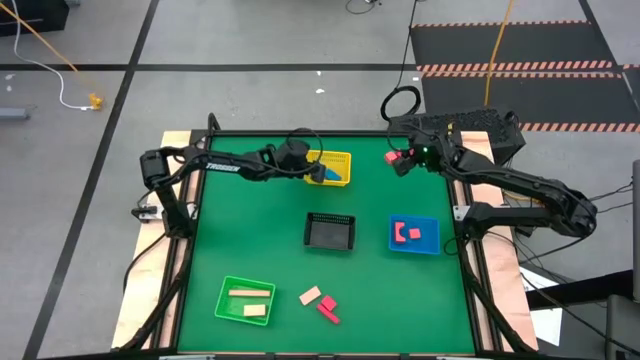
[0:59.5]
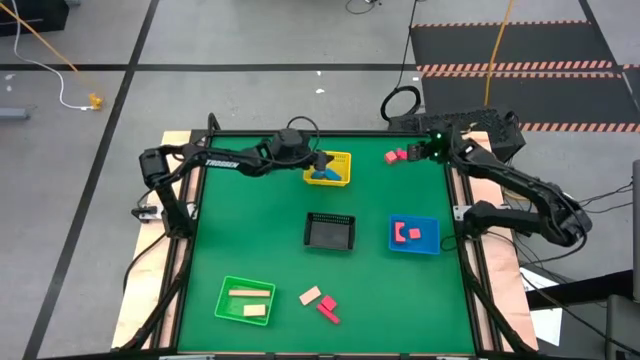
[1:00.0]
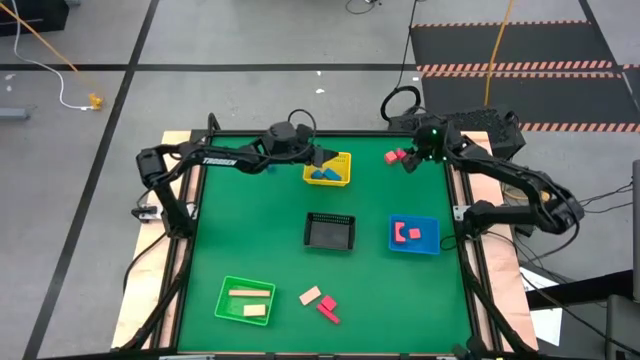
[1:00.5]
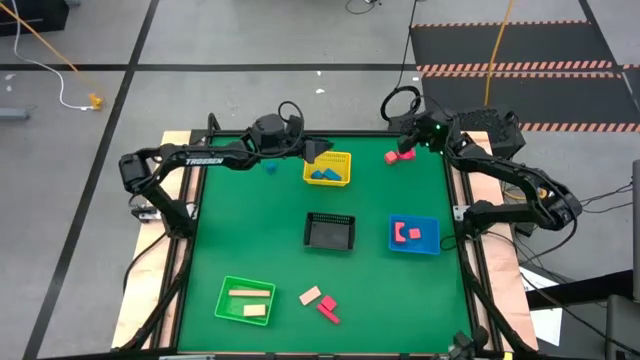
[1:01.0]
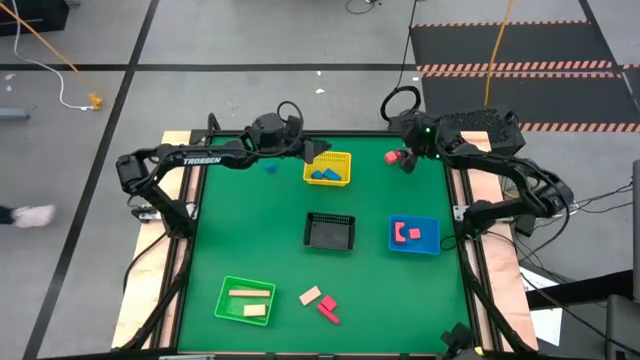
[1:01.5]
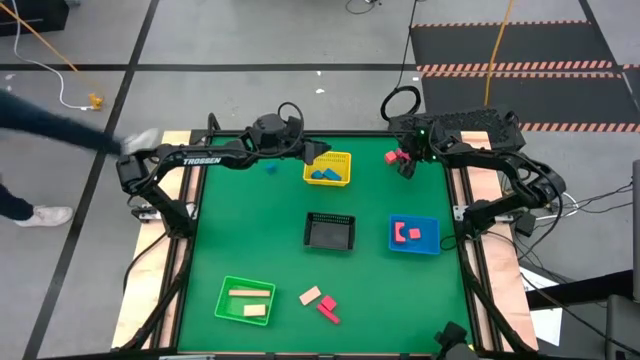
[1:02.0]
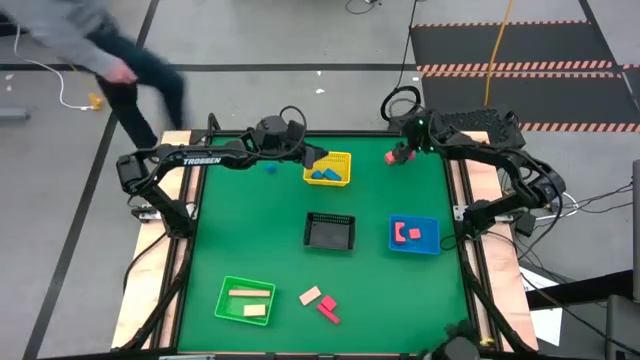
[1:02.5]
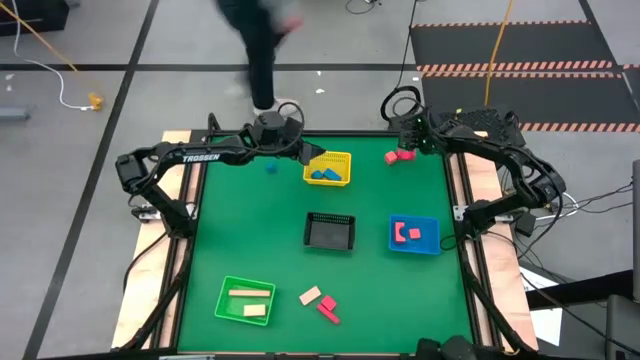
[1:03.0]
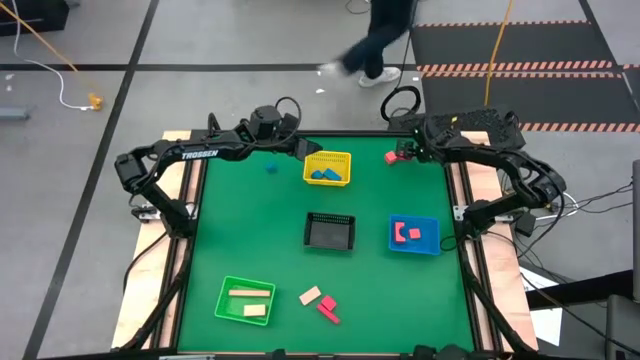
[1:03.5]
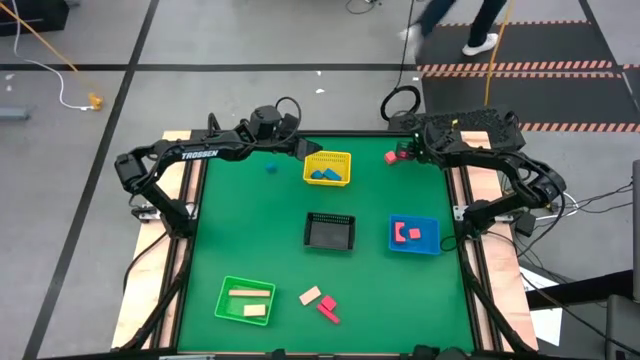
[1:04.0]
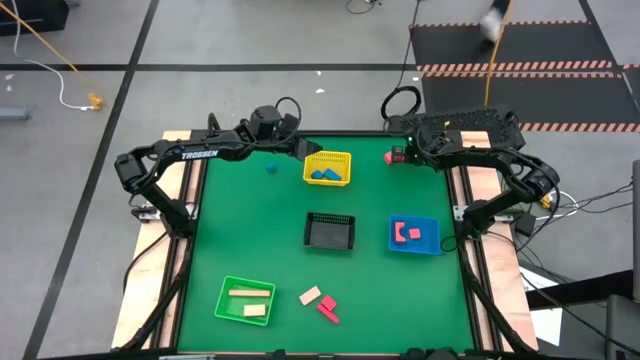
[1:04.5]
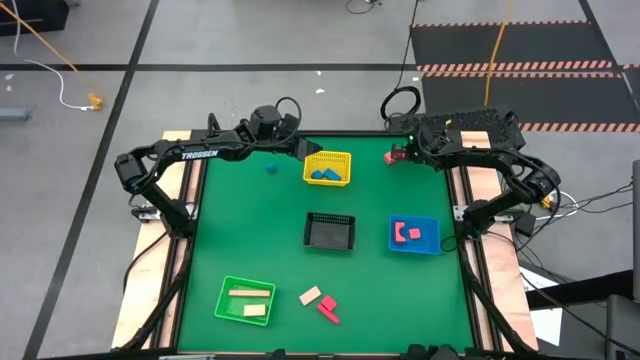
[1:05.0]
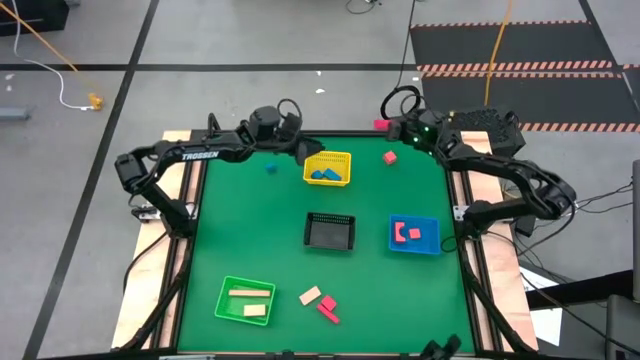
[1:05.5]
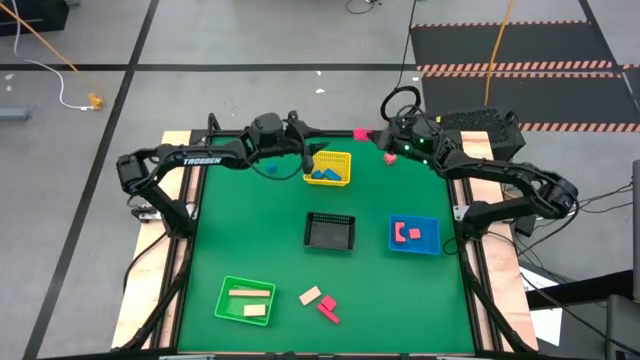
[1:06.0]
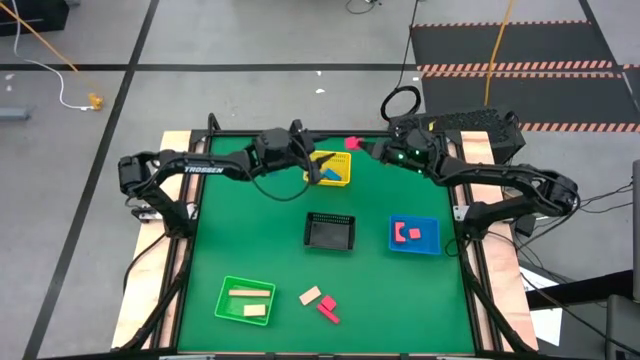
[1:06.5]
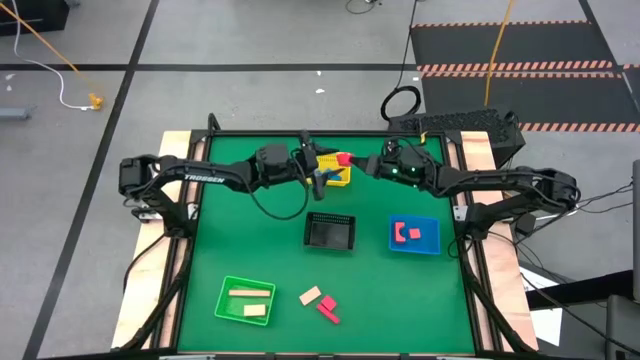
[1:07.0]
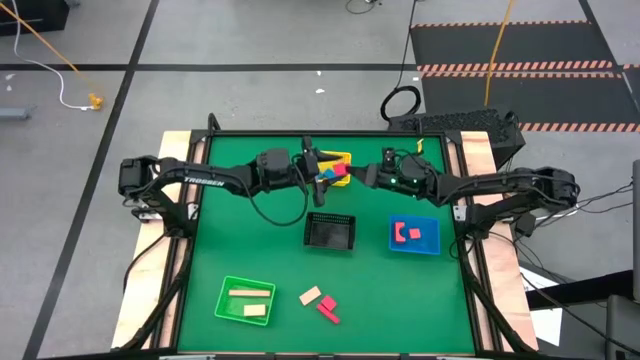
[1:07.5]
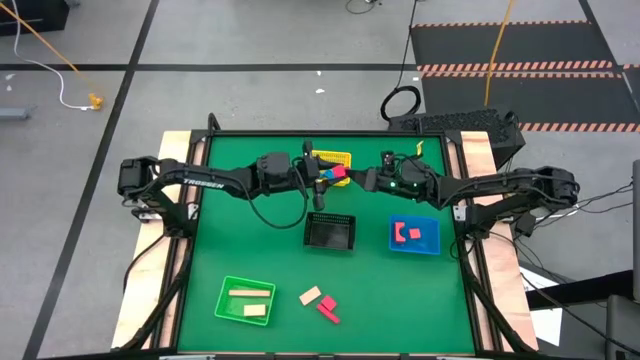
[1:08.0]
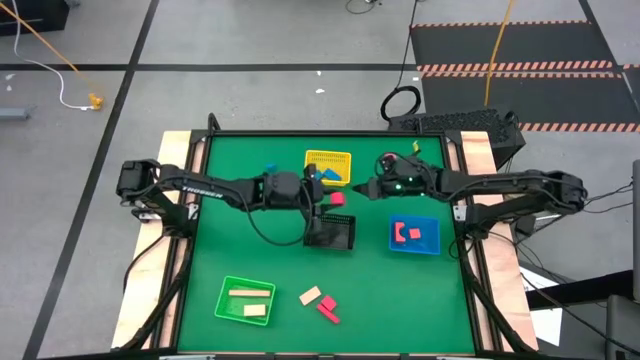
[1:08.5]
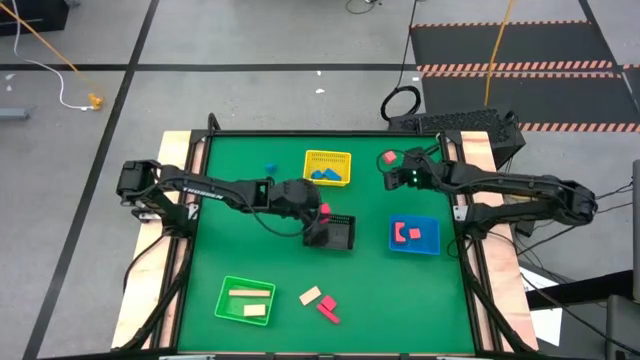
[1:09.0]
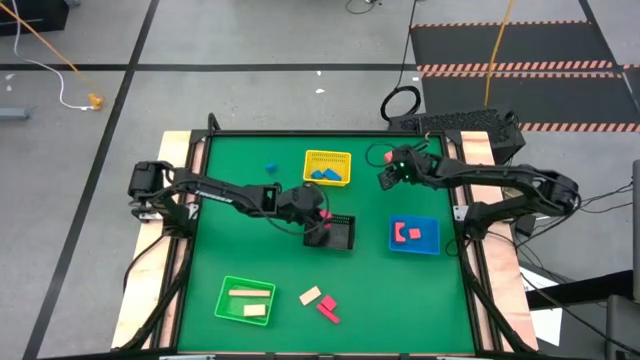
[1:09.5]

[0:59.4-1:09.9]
Task: Sort & place blocks by color
Put the top right red block into the black bin

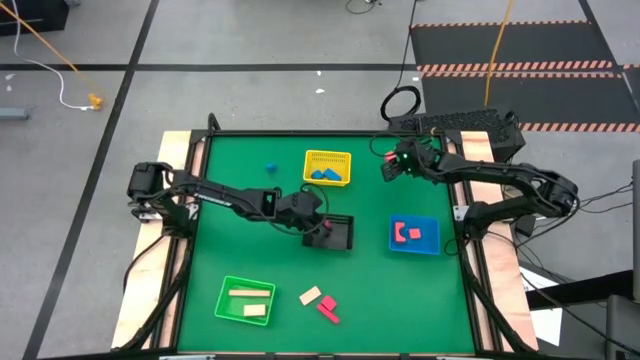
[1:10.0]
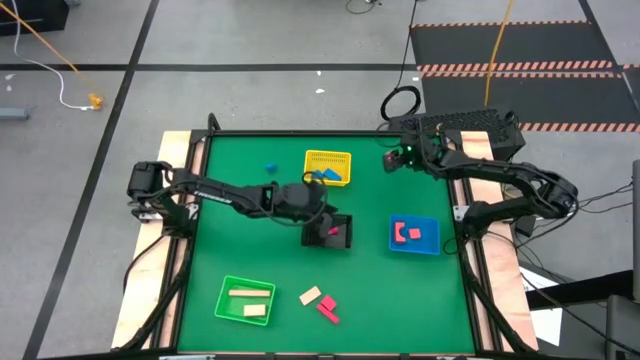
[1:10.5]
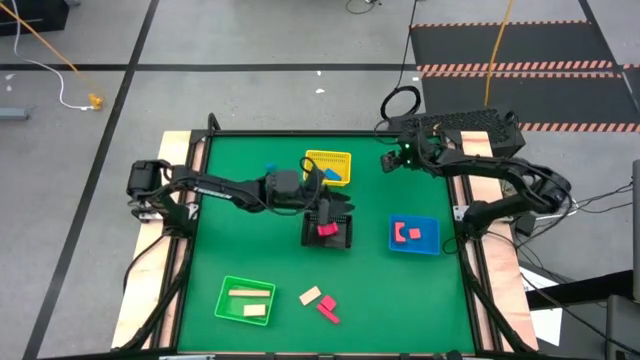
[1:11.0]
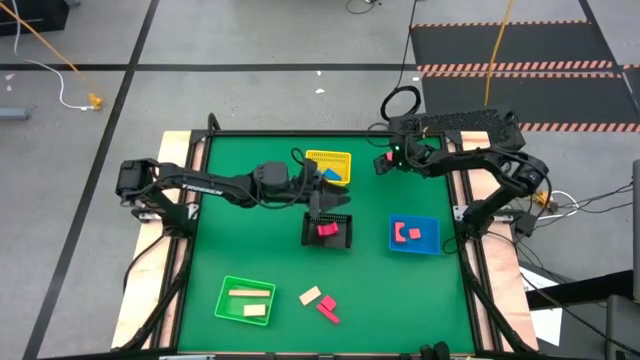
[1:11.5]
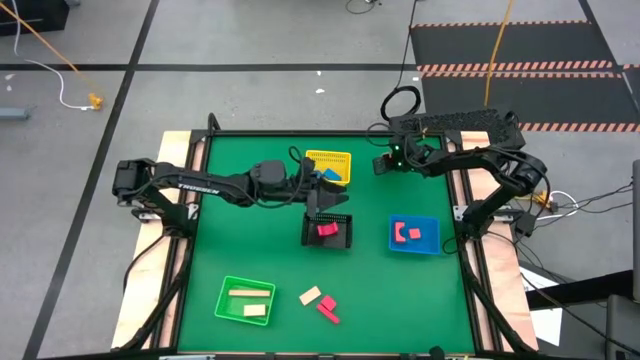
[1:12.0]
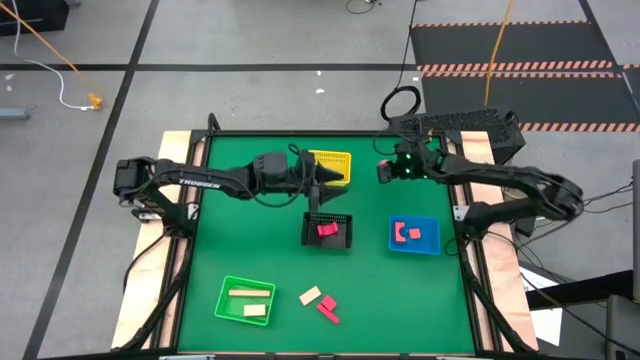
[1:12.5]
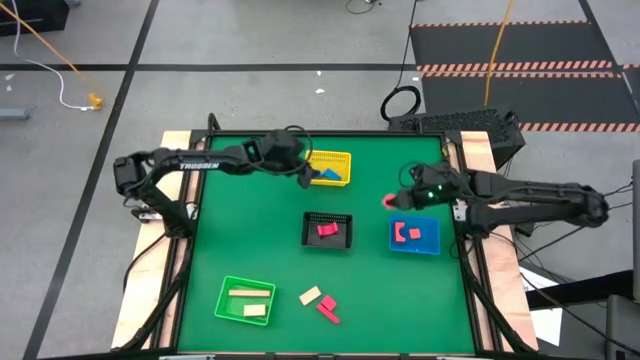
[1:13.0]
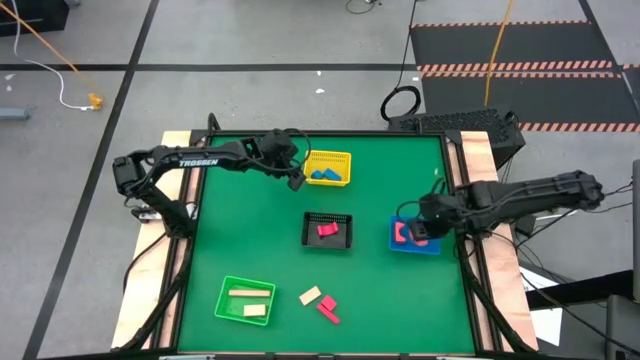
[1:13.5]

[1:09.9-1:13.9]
Put the orange block into the blue bin

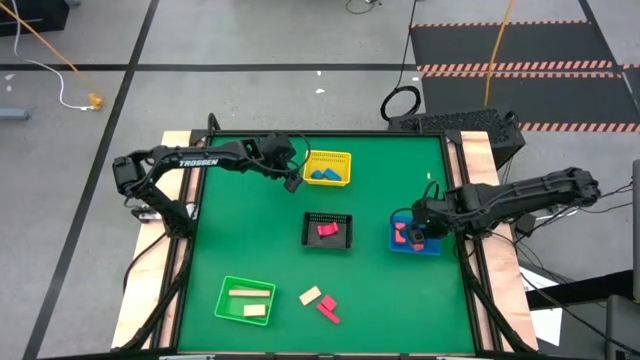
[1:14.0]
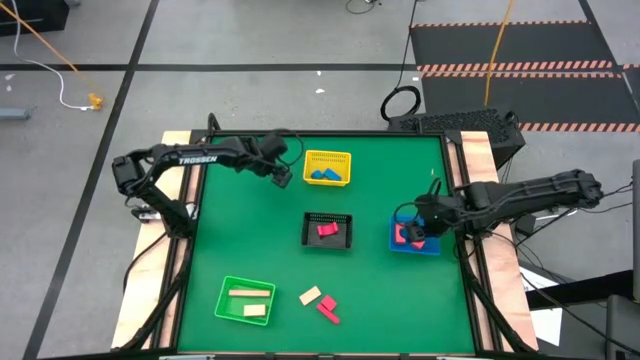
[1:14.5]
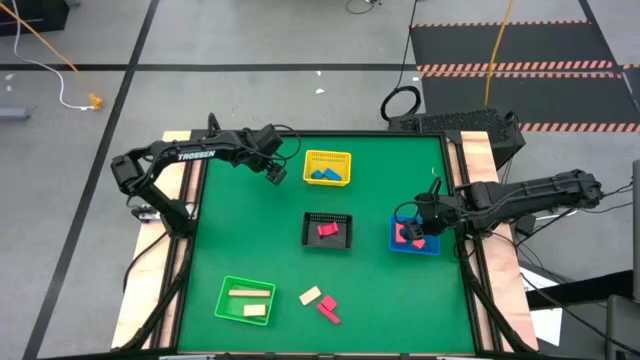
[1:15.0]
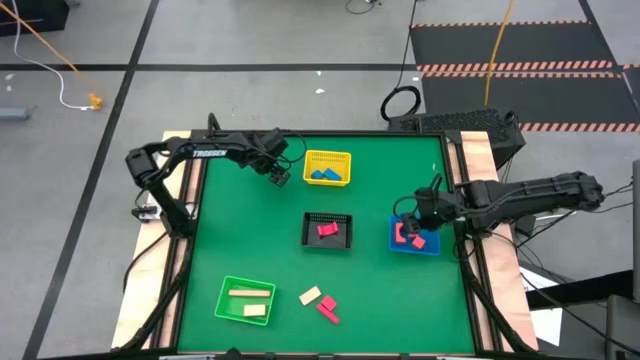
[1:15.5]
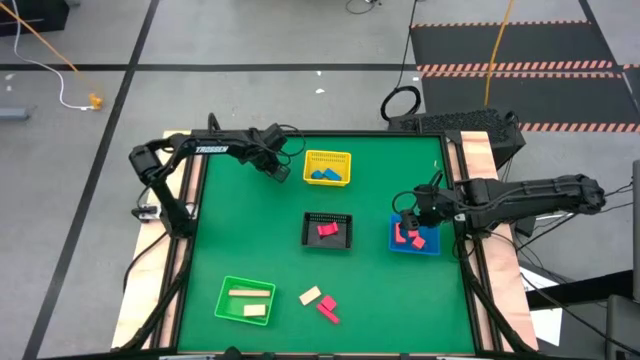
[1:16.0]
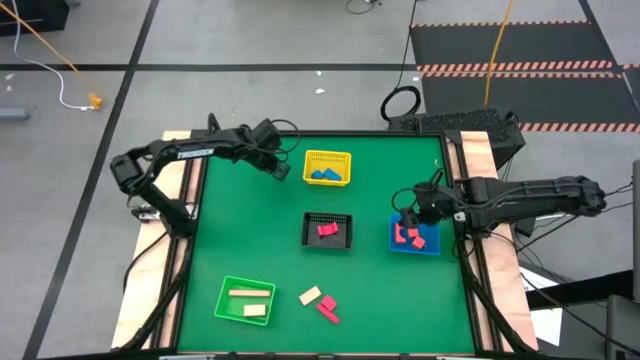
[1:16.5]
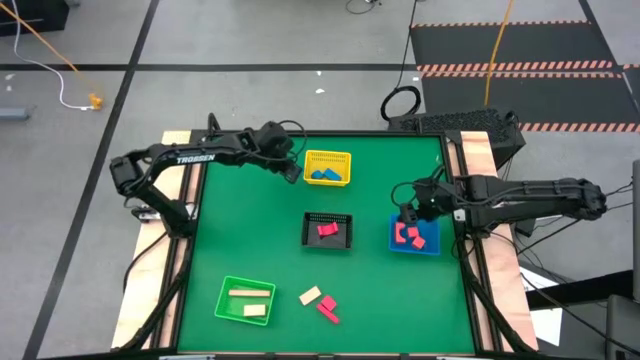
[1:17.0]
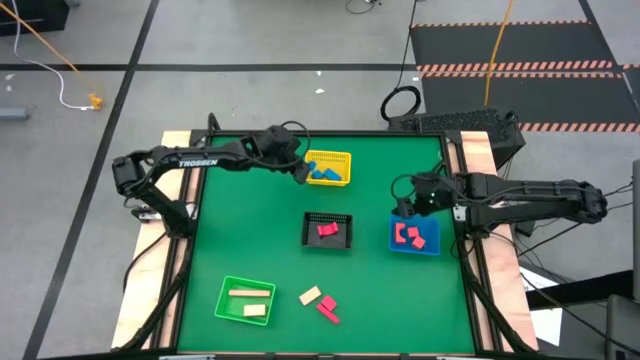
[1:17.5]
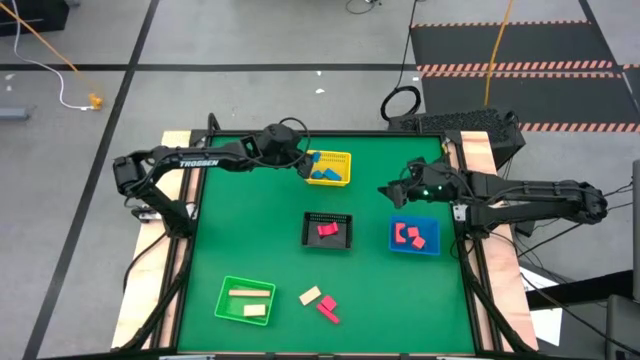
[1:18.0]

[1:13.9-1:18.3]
Put the blue block into the yellow bin

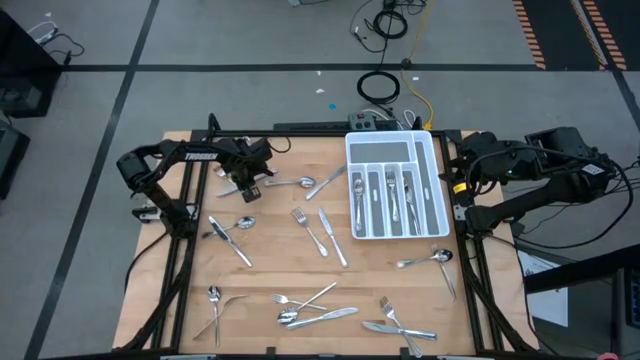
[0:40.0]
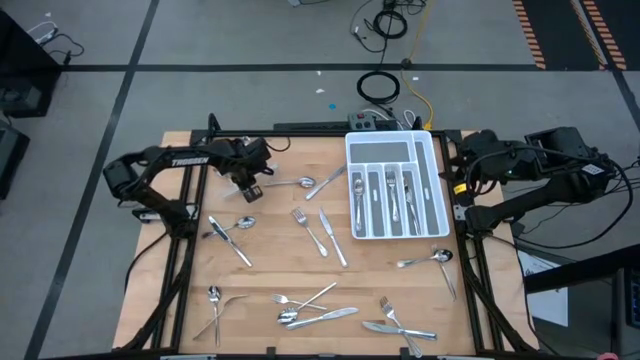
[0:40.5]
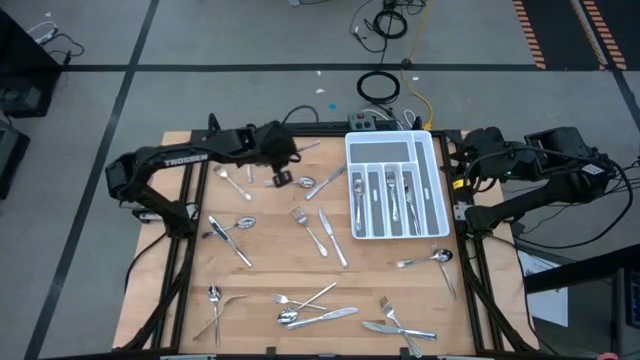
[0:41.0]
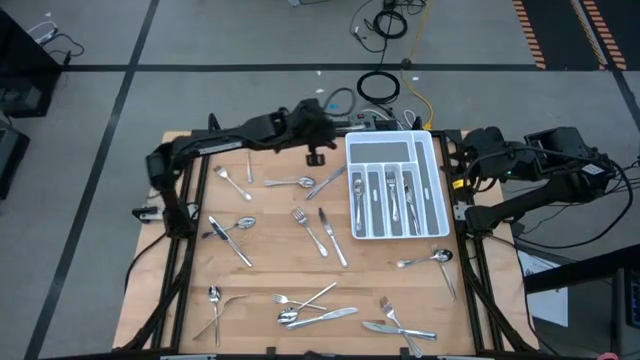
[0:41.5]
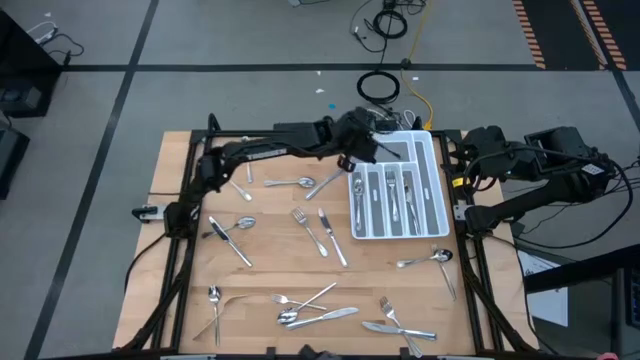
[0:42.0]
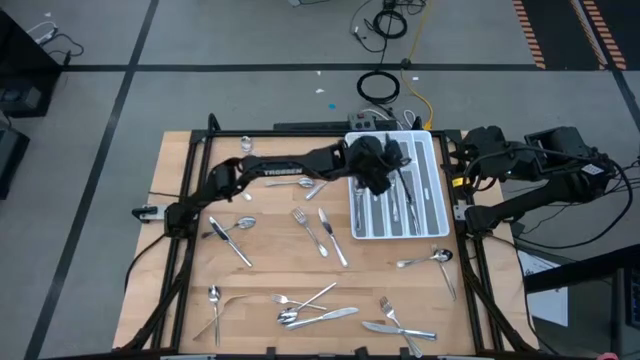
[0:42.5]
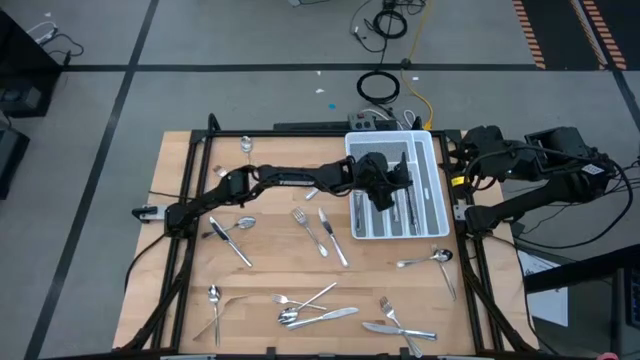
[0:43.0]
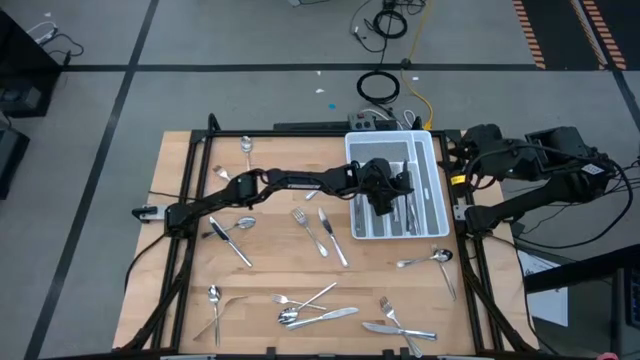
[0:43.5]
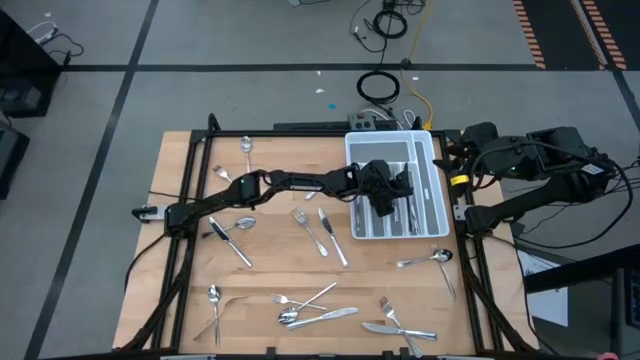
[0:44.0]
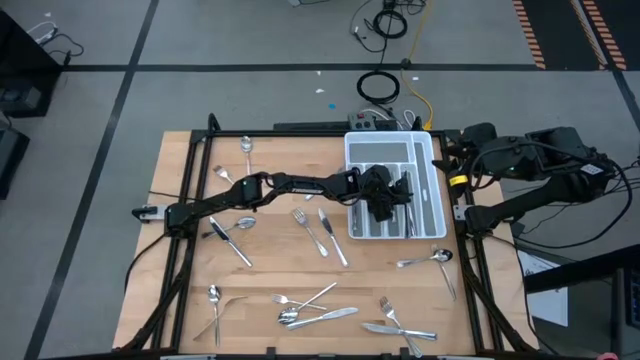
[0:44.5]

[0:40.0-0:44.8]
Task: Sort silverware
Put the silver knife into the white silverware tray
